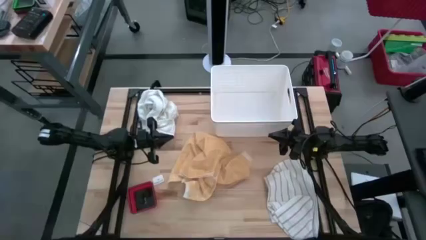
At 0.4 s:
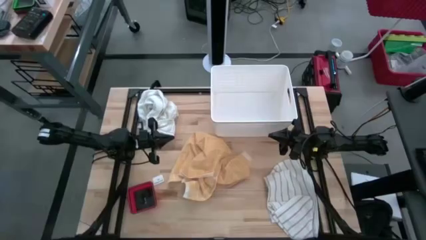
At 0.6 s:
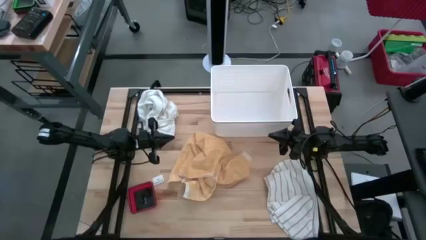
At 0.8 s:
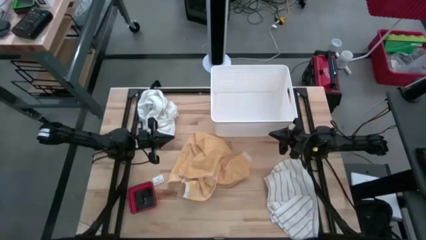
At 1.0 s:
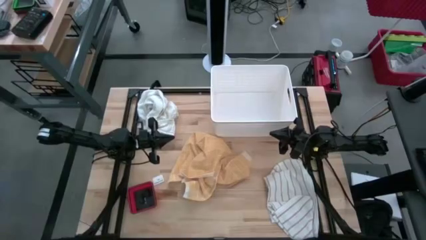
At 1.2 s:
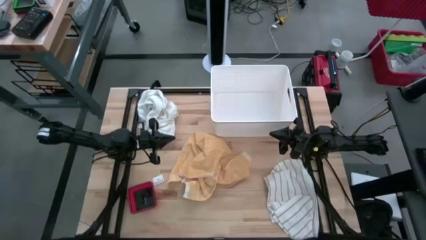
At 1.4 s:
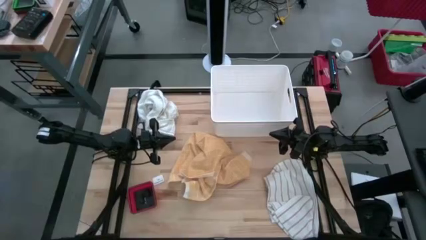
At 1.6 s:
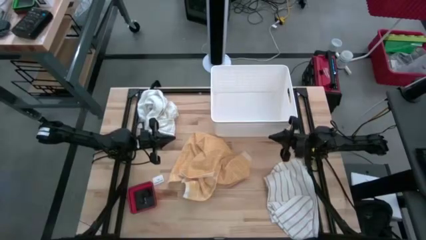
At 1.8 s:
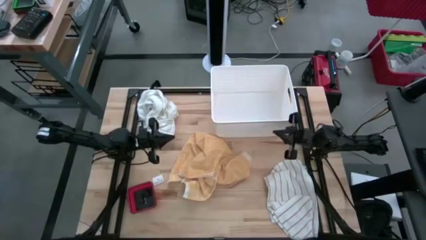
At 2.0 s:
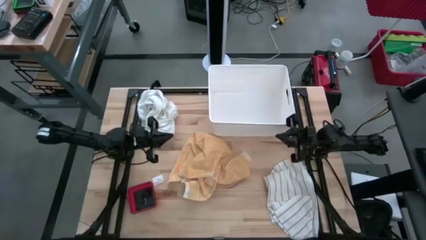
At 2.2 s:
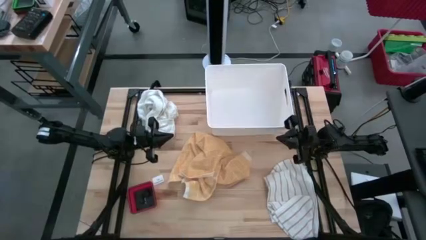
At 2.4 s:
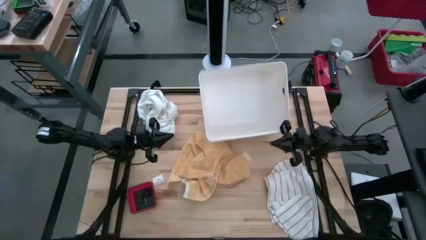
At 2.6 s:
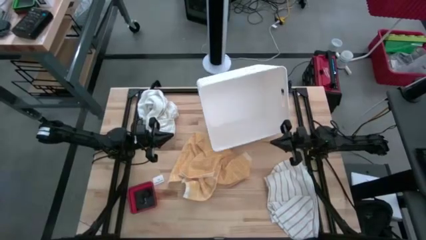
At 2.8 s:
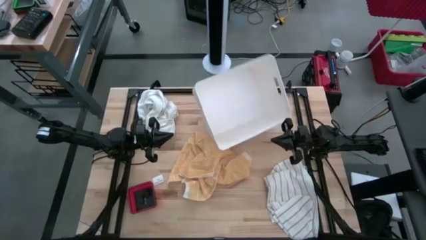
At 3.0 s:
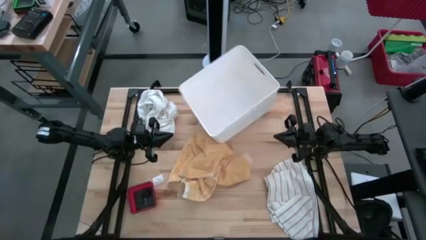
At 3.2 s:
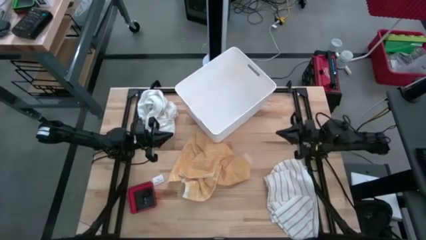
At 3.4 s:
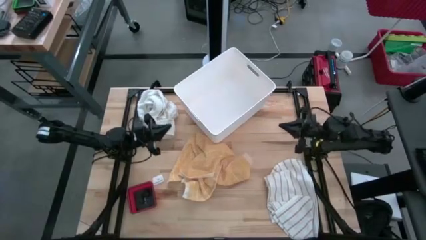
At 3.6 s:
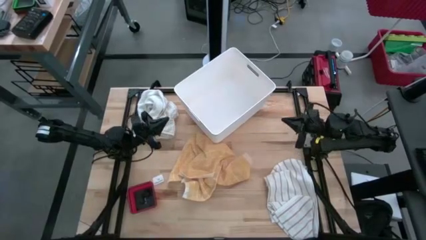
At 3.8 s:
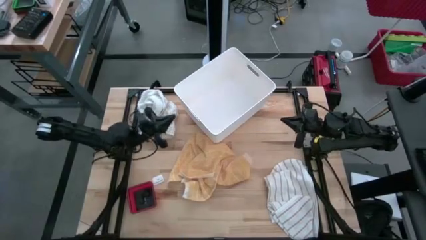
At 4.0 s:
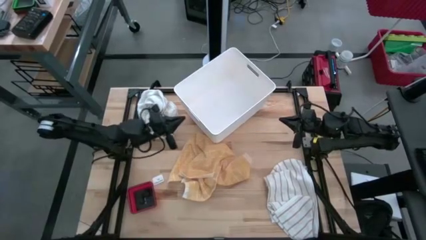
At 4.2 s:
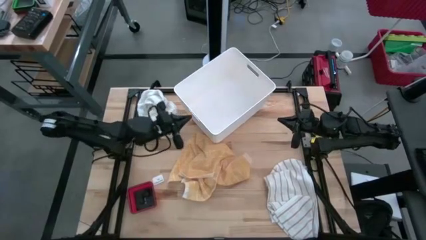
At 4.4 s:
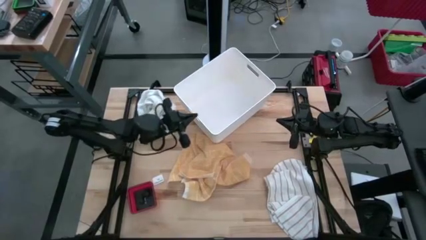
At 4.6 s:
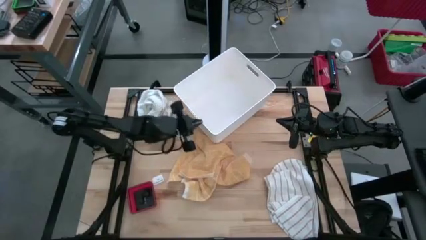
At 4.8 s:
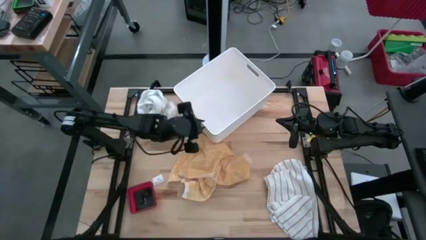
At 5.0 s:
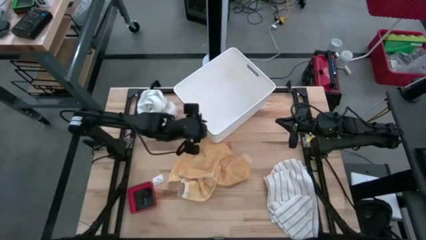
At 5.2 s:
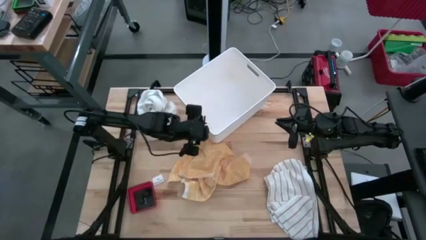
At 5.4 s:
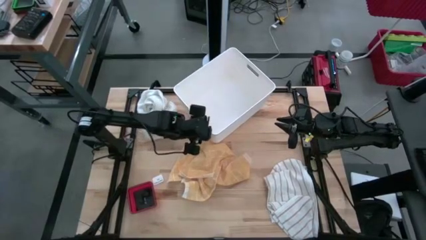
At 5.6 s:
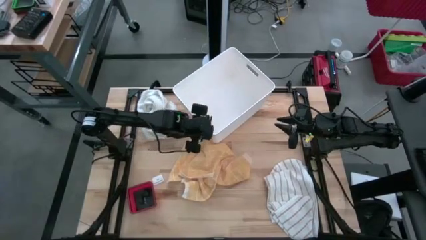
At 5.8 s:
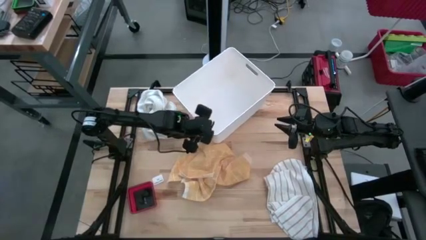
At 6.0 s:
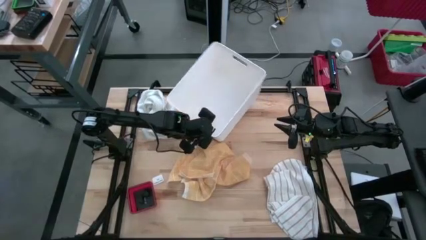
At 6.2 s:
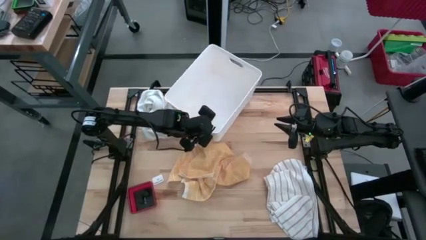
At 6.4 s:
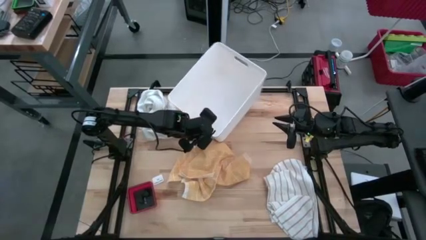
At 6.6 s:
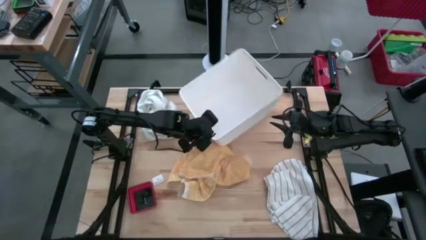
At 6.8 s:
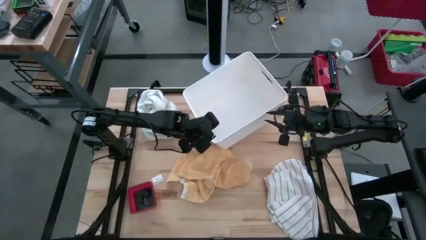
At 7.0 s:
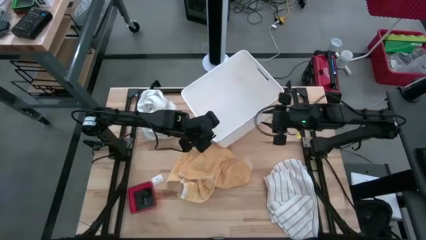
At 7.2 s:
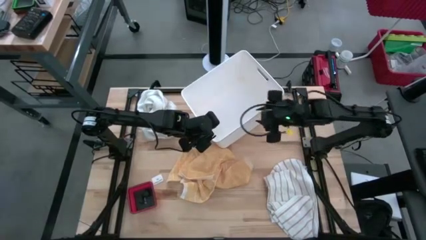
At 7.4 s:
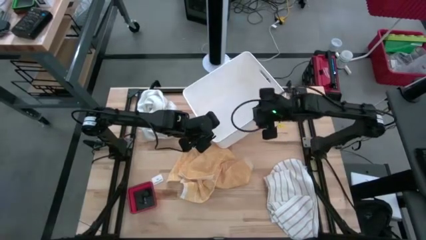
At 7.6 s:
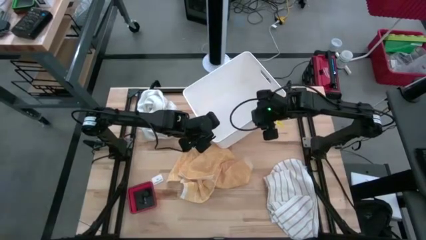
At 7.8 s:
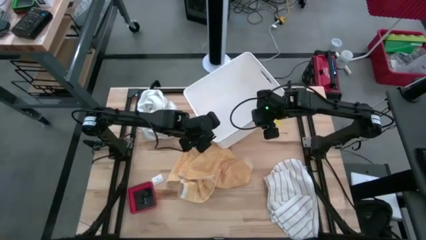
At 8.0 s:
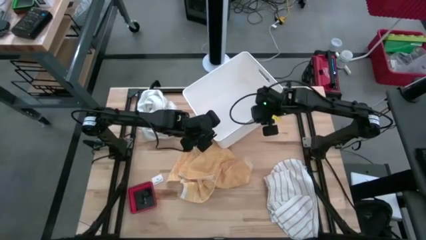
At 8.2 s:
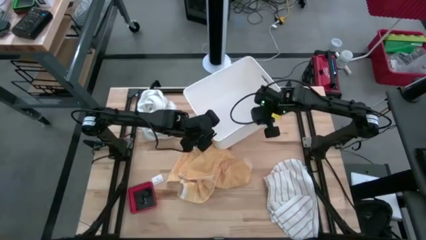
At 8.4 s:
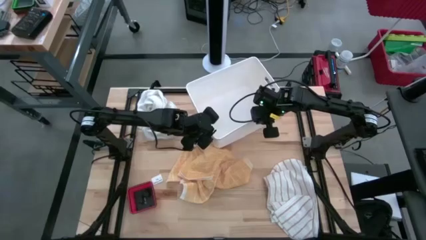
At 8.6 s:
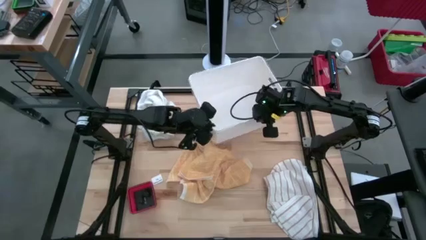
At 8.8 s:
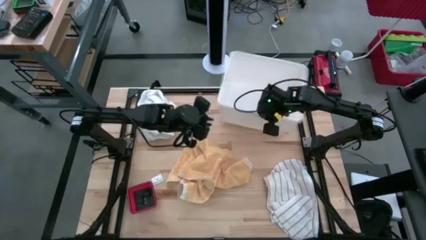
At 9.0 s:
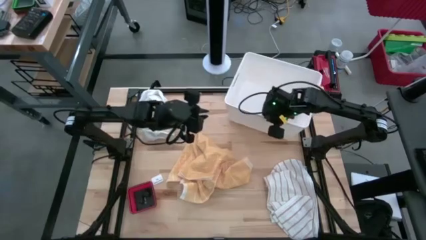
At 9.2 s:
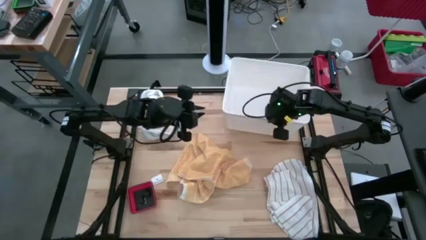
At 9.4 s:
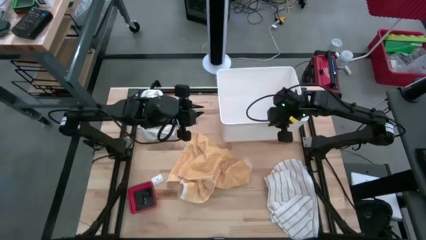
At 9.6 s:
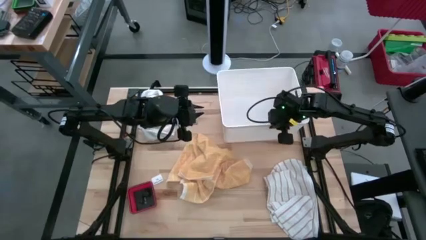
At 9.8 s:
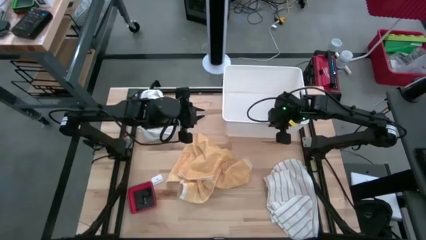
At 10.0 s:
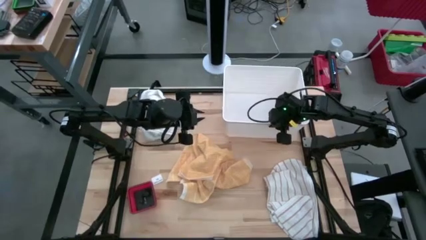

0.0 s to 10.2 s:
Task: Fold towel
Move the white laundry bin to the top right of the table
